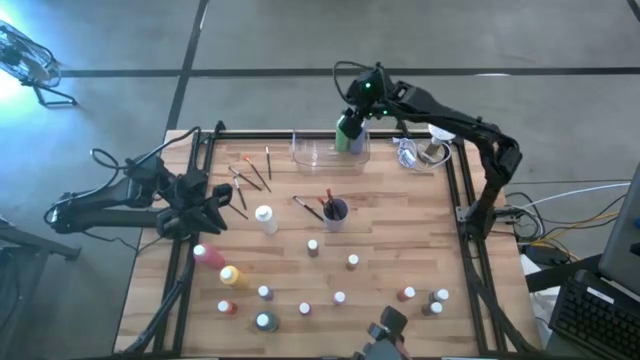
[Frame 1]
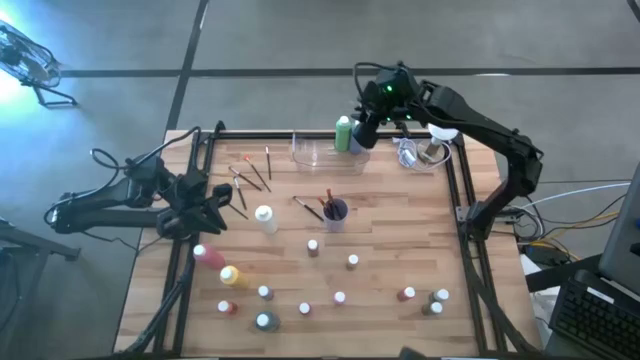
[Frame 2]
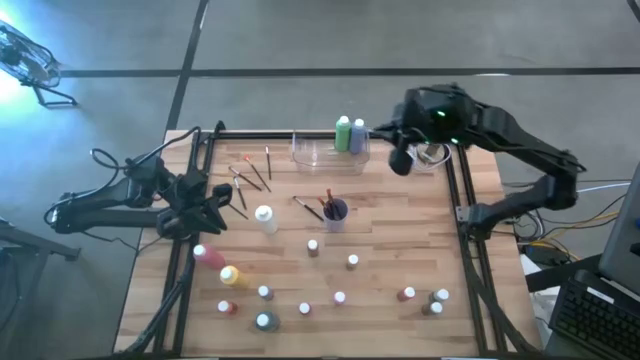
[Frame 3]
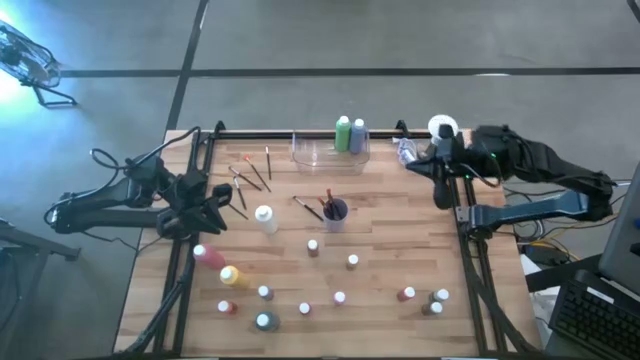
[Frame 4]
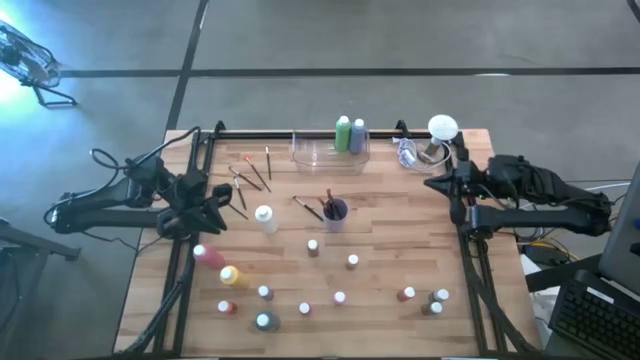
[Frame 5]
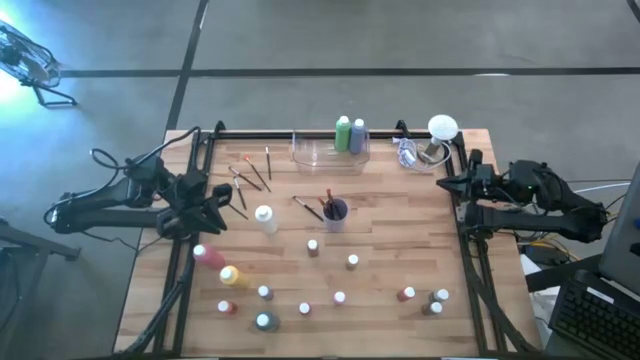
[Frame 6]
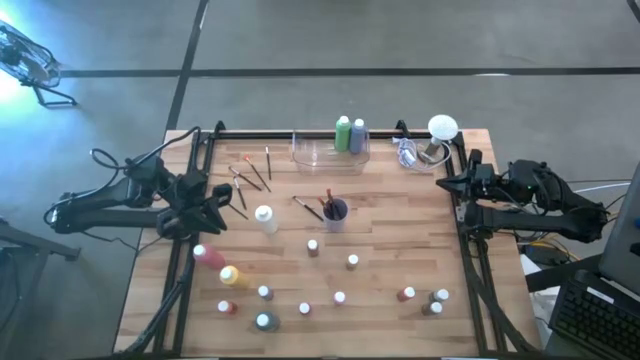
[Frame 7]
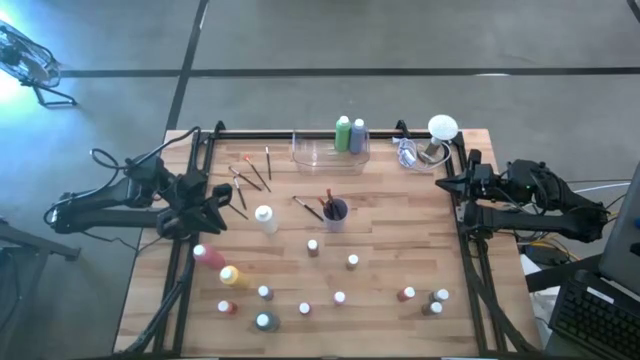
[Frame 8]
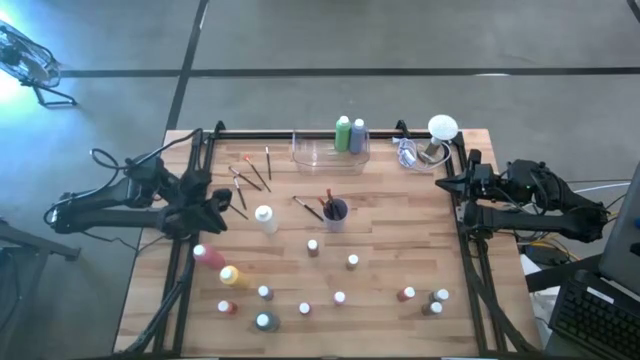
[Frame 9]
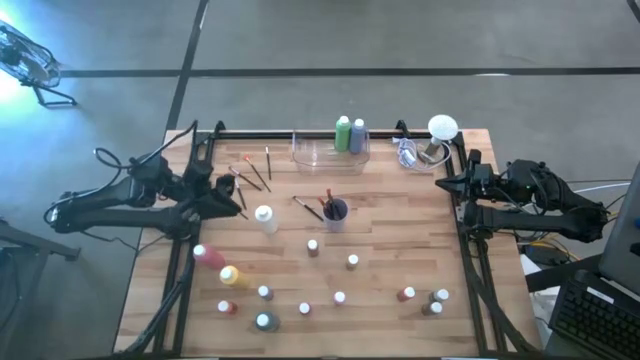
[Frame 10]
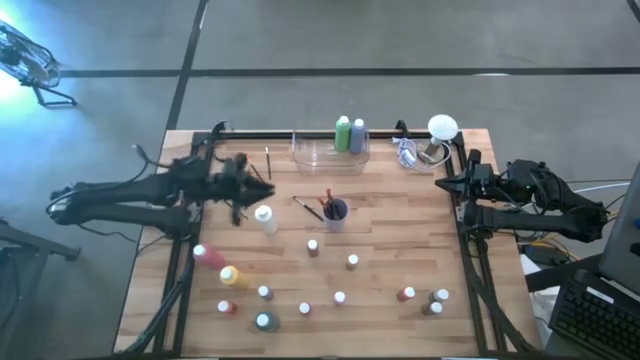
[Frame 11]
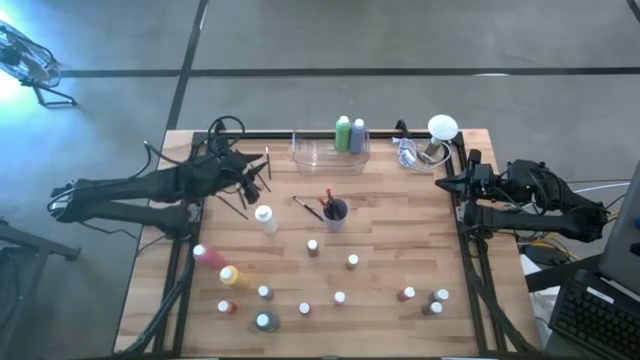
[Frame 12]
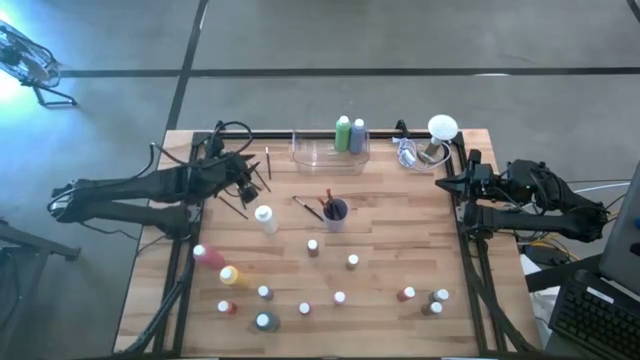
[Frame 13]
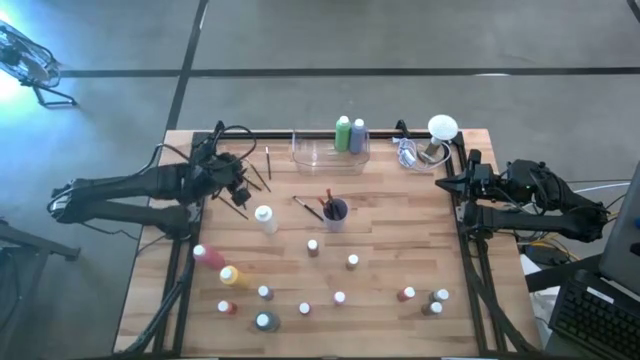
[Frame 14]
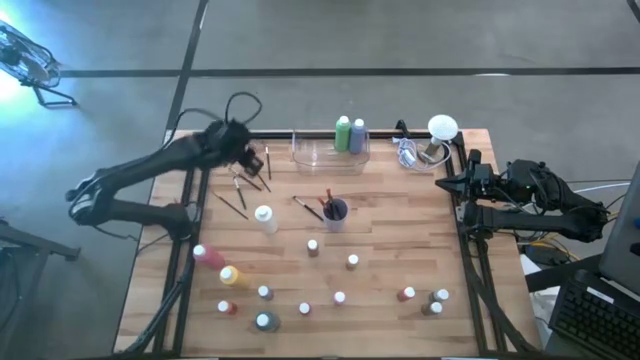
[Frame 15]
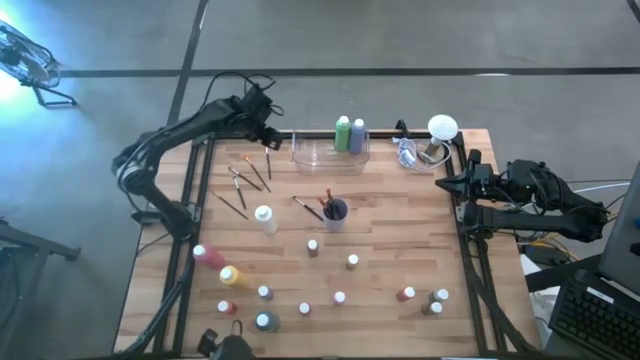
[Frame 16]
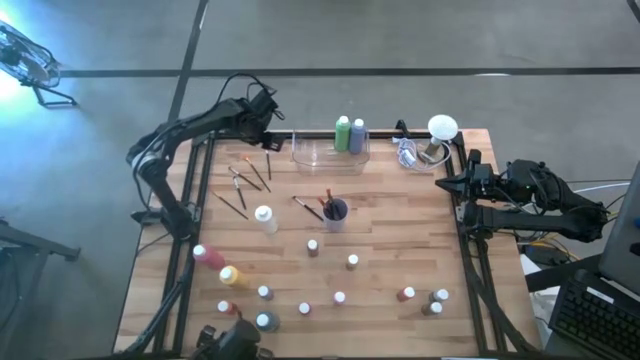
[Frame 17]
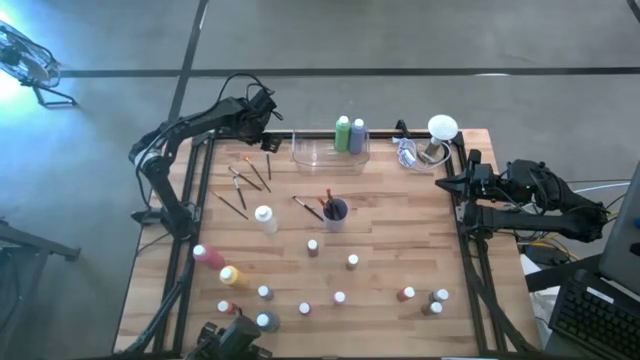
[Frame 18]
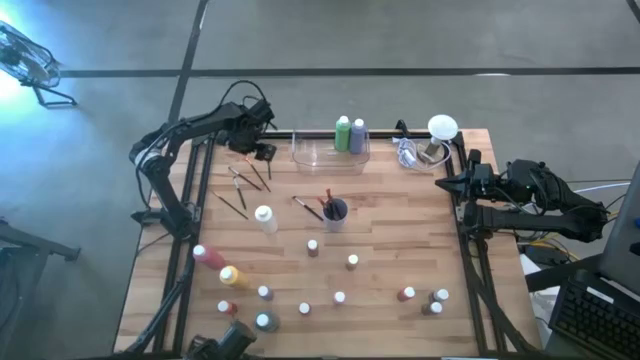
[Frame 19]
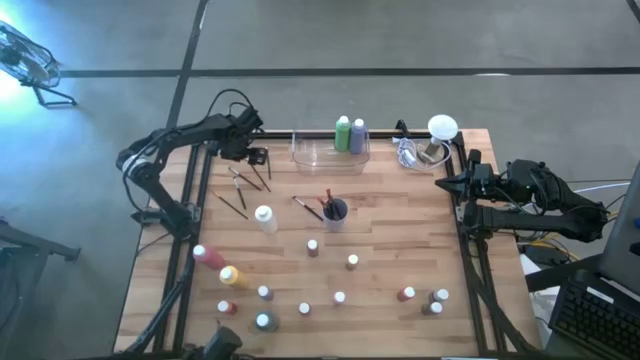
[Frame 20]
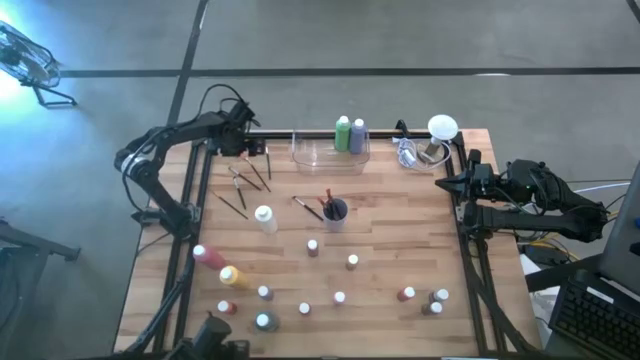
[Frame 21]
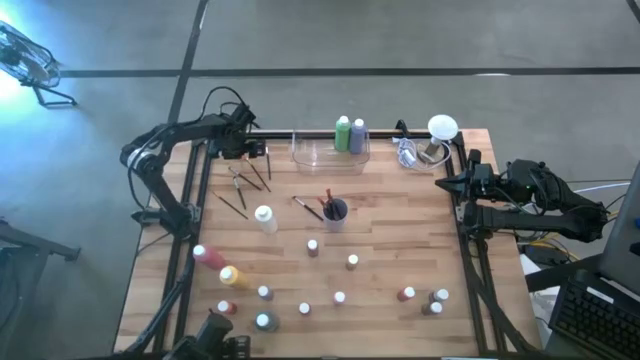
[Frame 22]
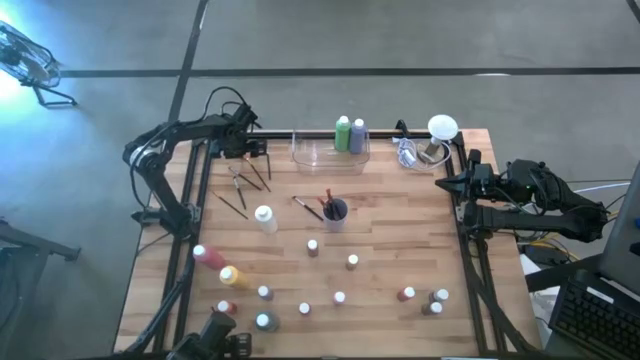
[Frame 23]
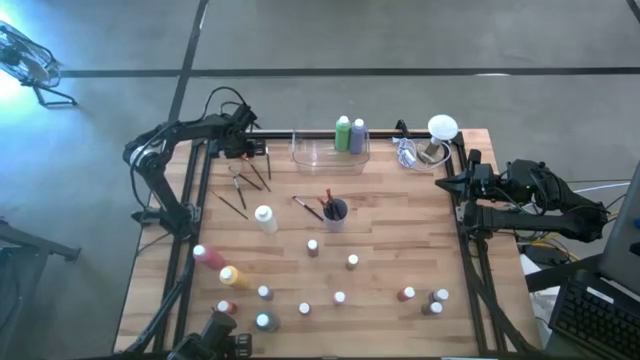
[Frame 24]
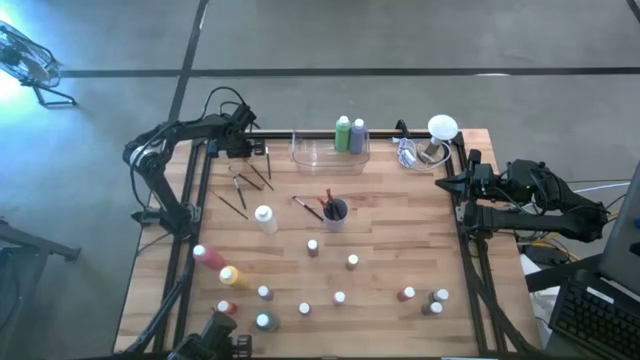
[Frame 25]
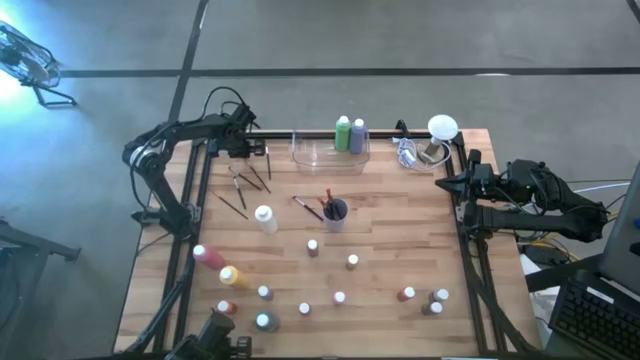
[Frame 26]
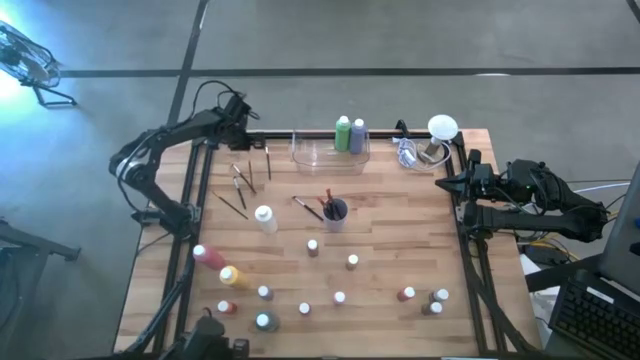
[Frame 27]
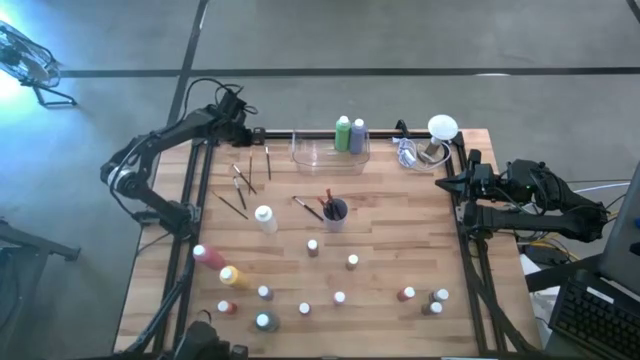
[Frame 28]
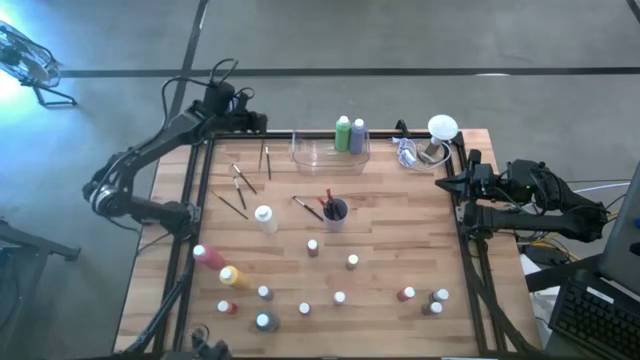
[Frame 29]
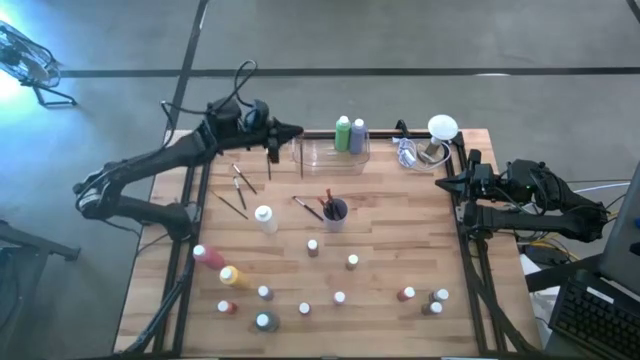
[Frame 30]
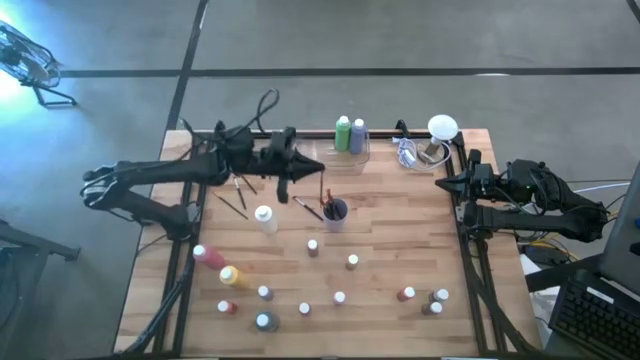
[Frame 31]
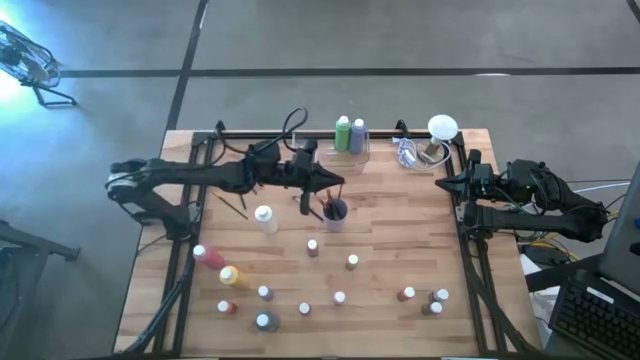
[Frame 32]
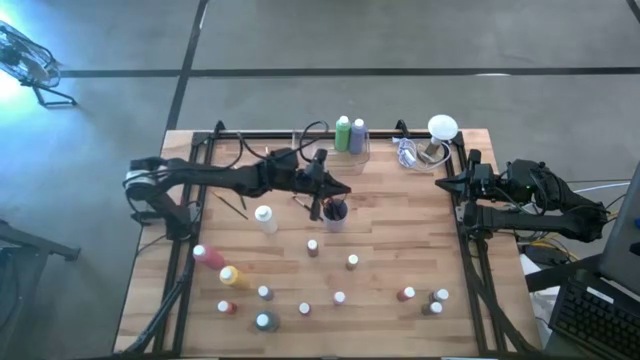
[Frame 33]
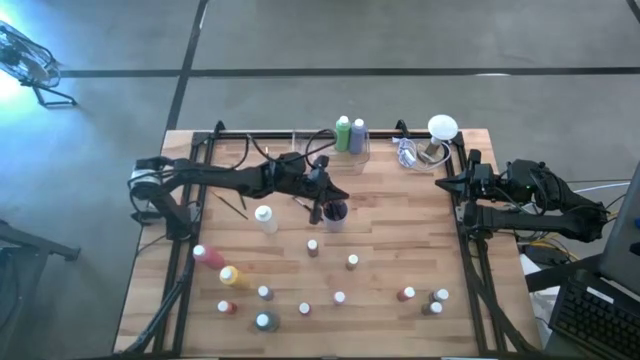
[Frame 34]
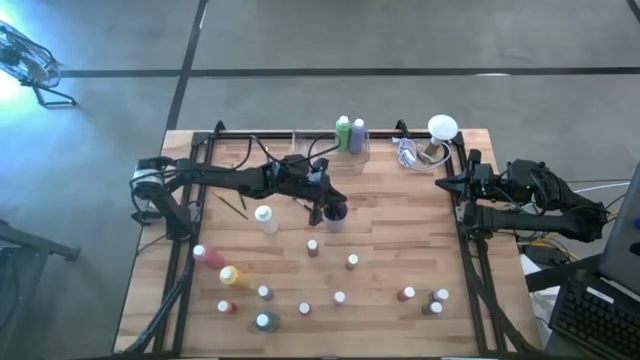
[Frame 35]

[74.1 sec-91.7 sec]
Task: Pick & Place Paint Supplies
Put the gold paint brush into the purple cup

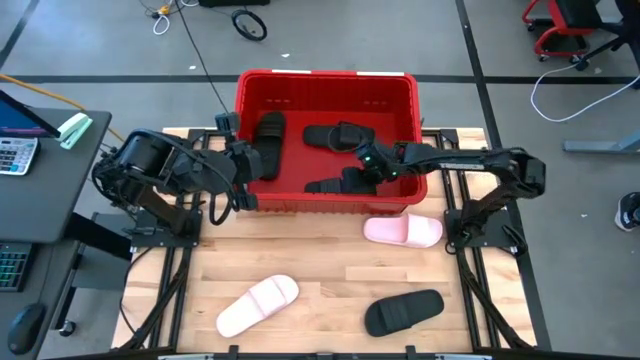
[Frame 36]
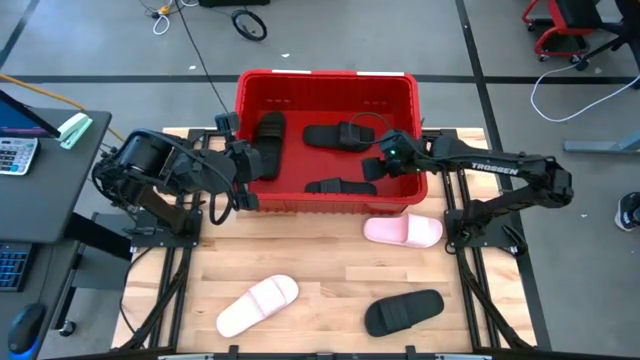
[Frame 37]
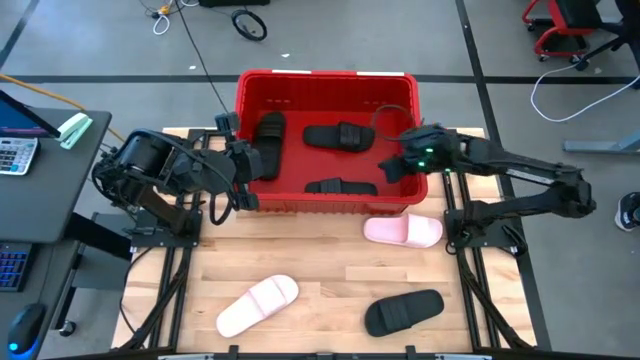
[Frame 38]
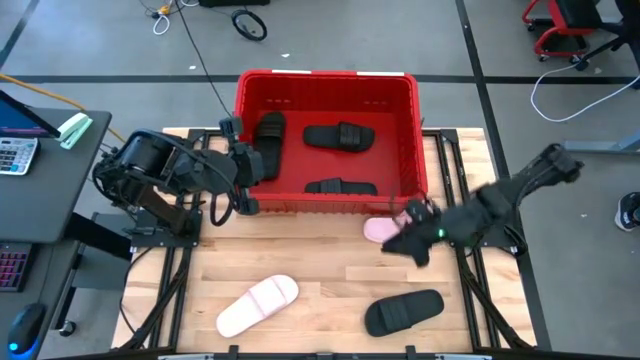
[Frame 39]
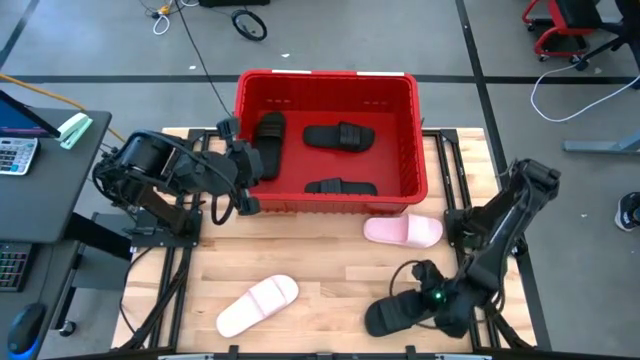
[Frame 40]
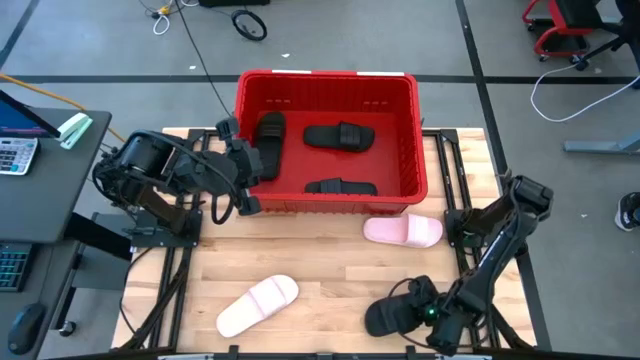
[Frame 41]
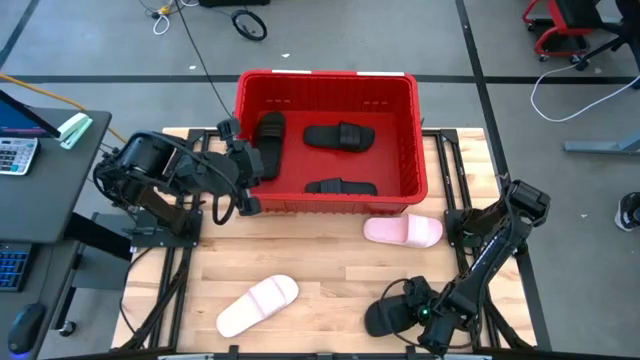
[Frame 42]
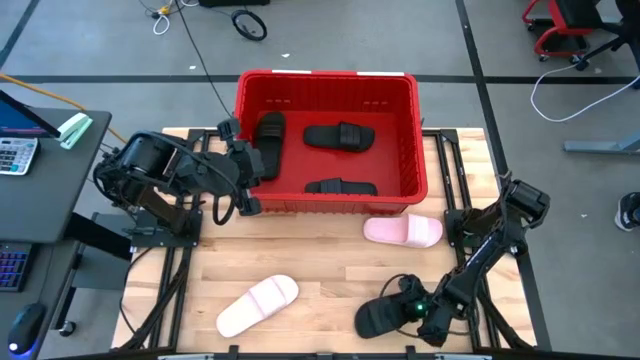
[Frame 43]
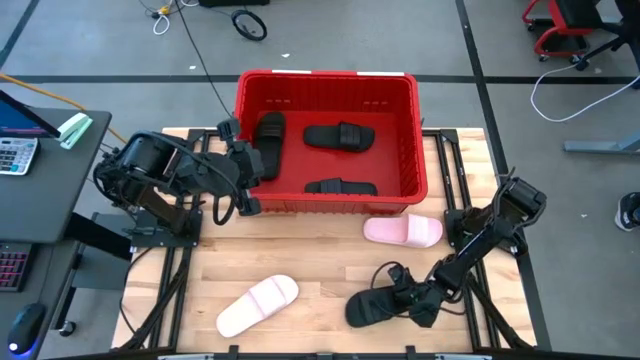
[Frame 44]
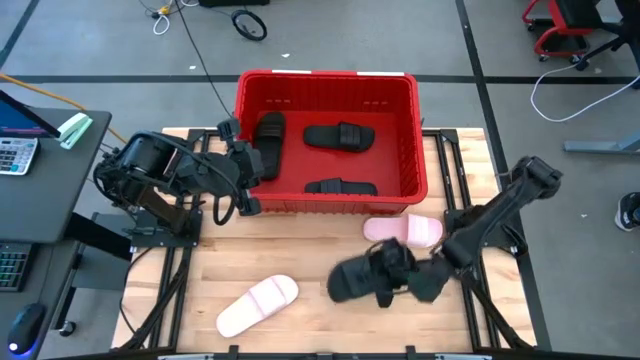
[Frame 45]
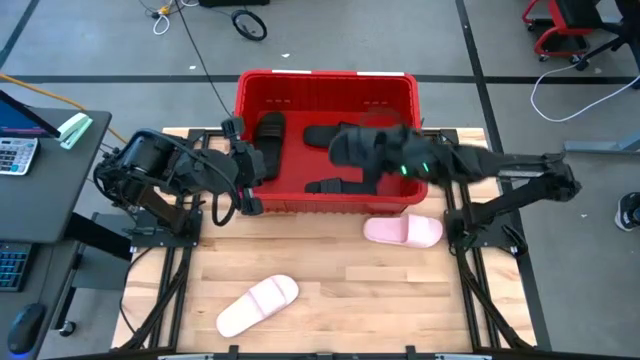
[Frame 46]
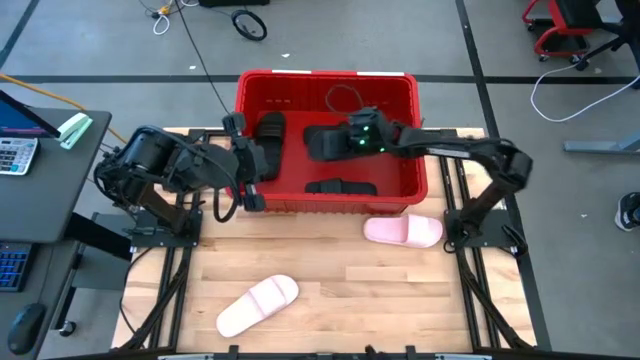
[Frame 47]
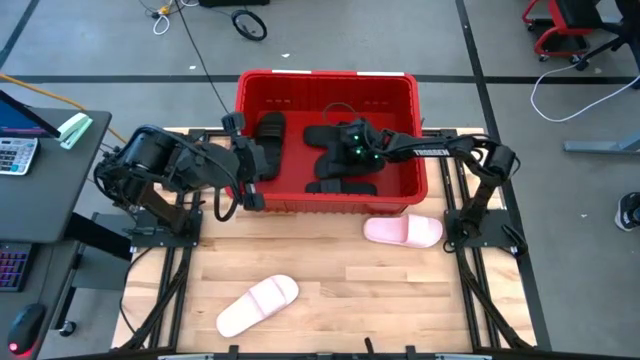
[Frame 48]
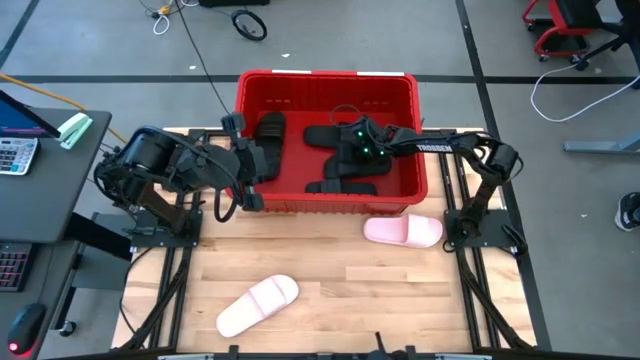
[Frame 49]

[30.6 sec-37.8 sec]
Task: Pick and place slides into bin
Put the black slipper into the red bin
